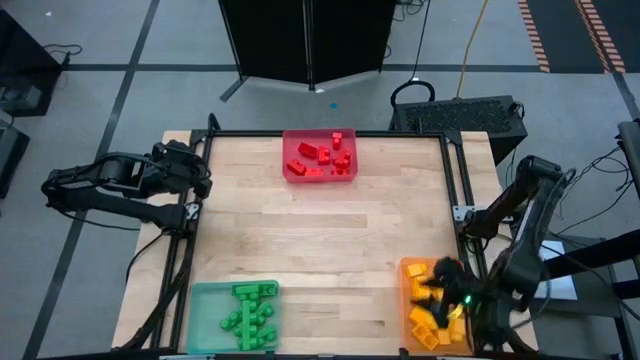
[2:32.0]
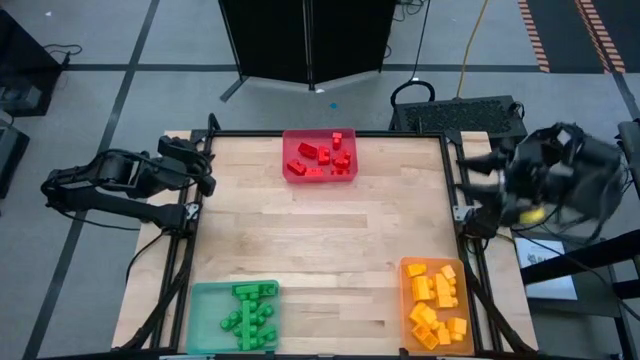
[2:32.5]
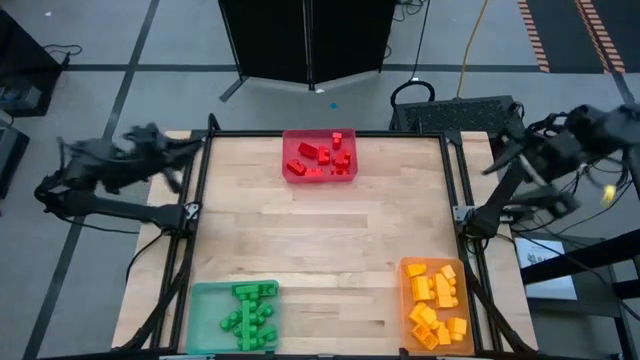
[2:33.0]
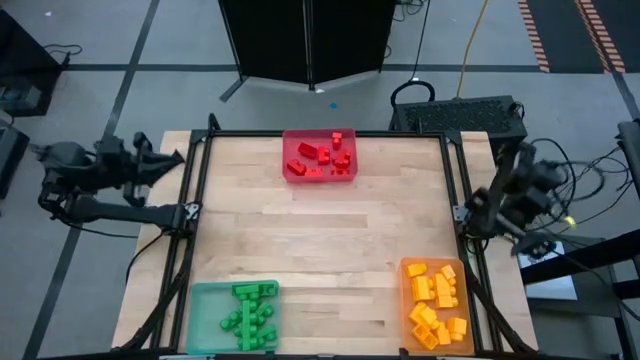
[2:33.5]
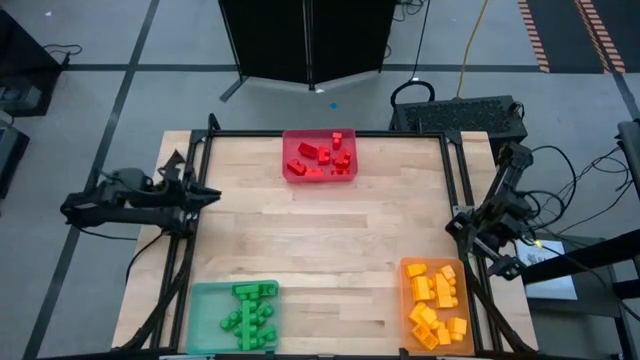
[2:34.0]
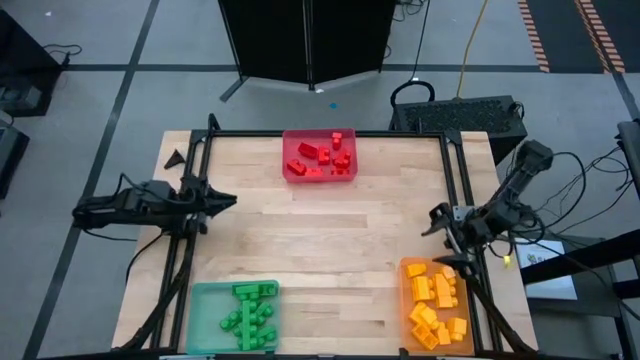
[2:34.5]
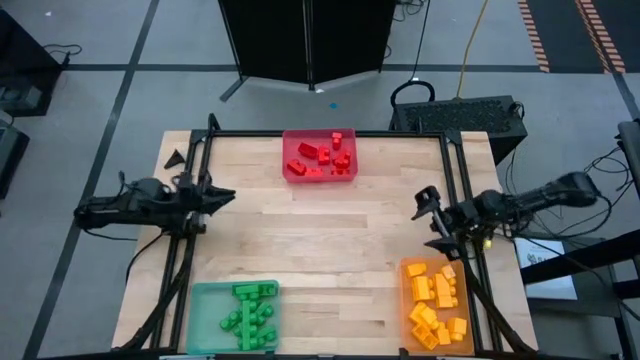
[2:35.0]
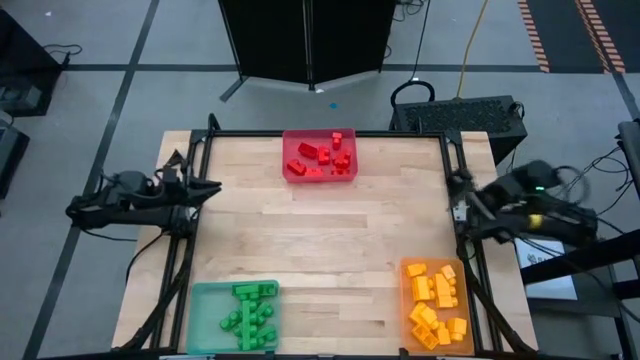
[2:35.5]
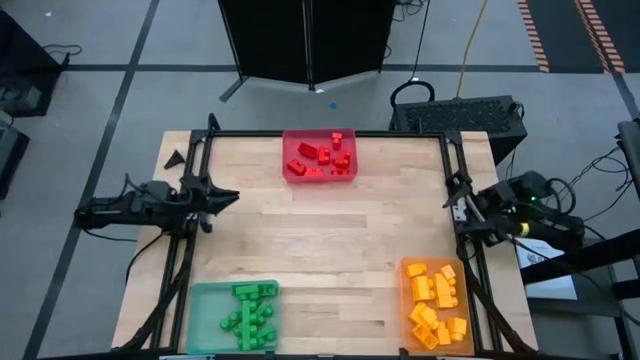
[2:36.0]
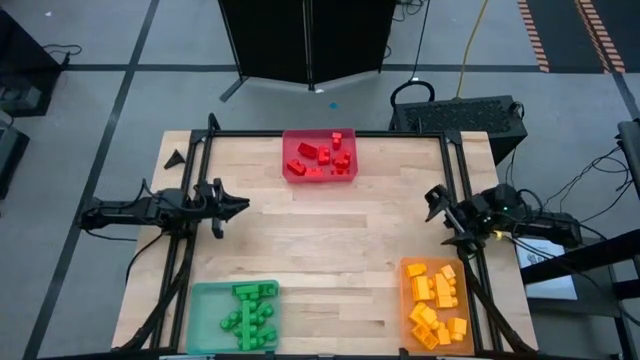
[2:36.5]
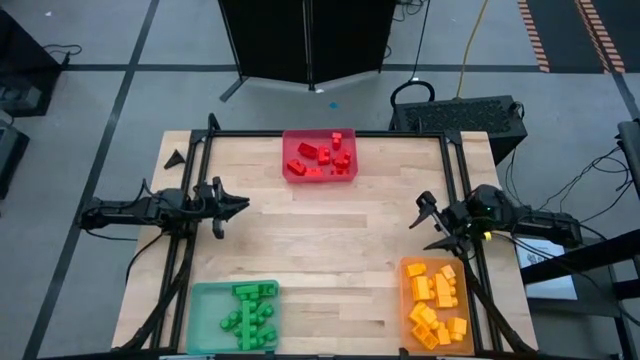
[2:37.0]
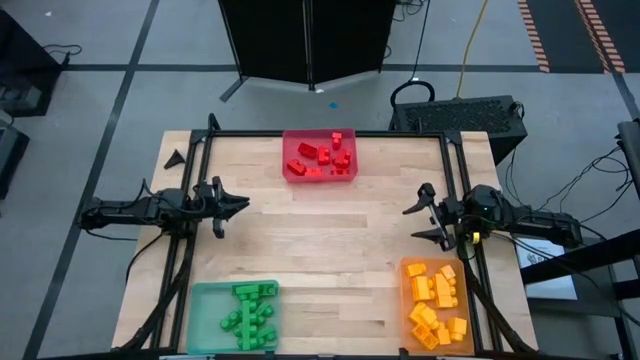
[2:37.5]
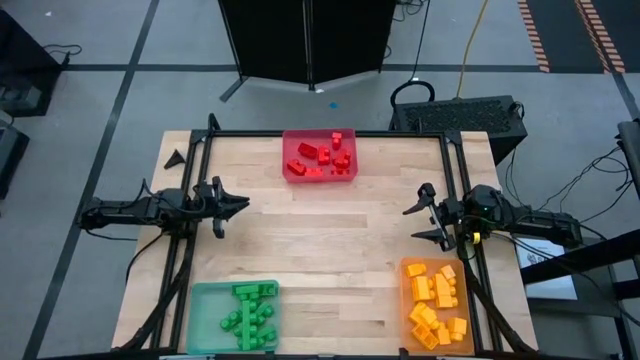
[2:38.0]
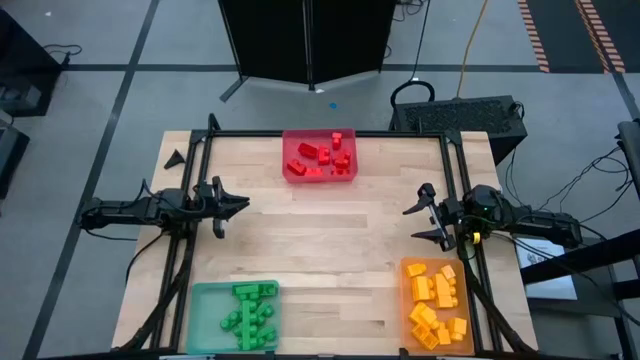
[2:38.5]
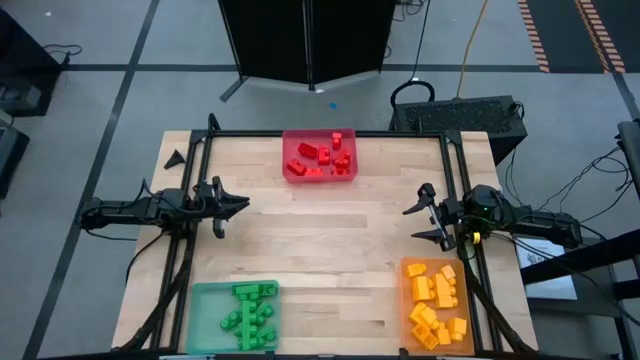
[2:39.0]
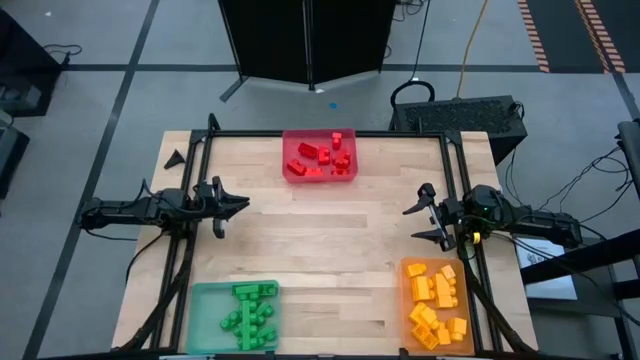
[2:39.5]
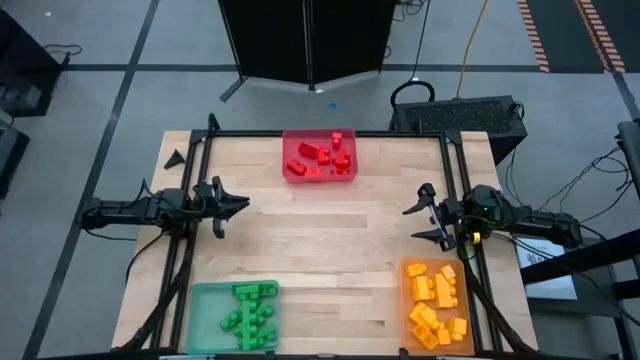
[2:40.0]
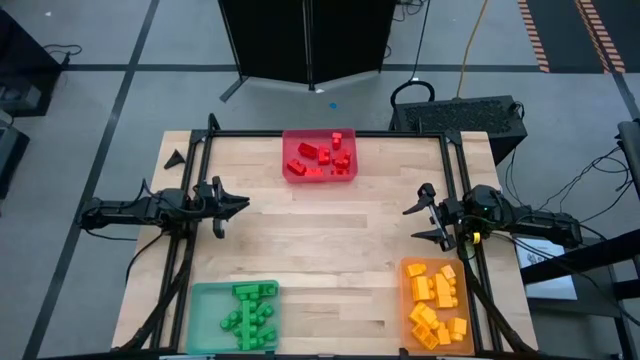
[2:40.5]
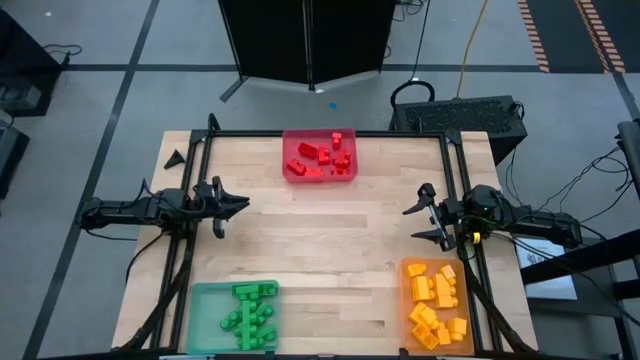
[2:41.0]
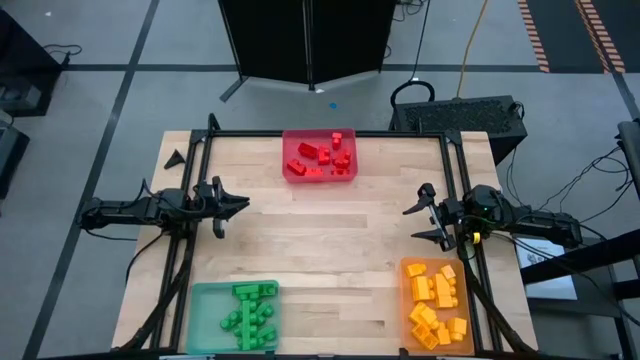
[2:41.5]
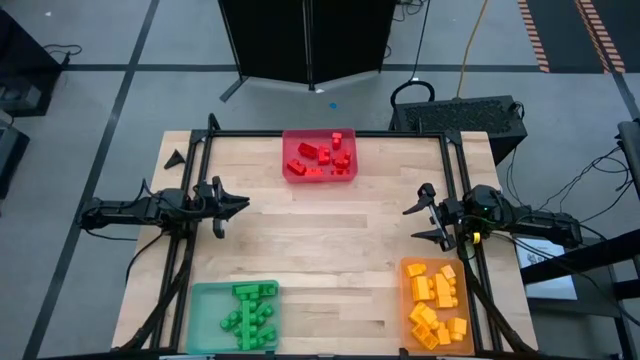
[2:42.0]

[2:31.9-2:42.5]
Task: Sort blocks
Return to Home Position

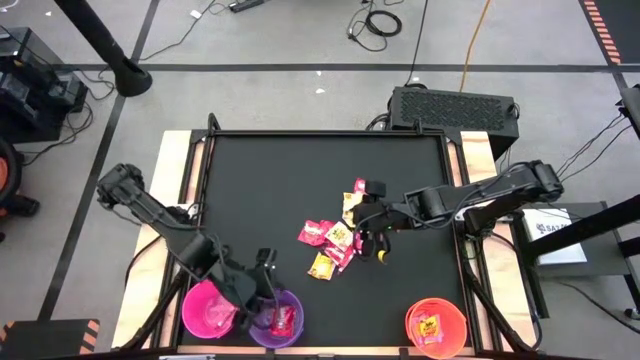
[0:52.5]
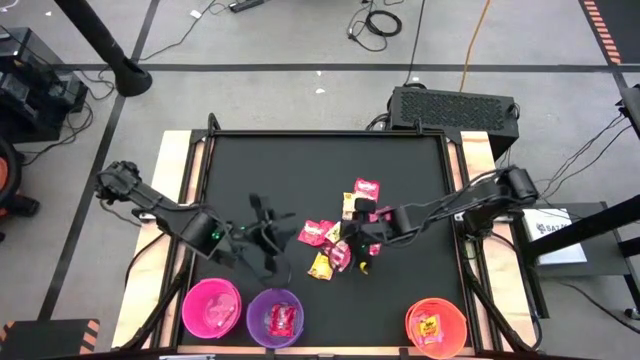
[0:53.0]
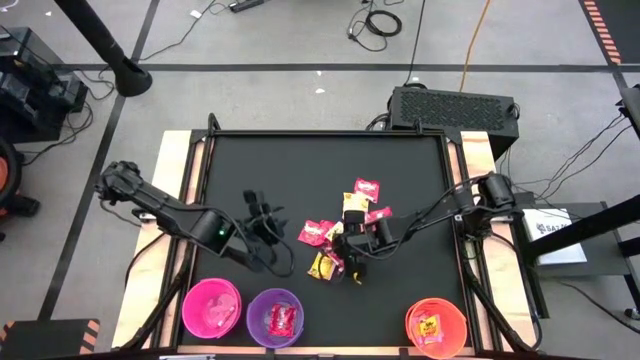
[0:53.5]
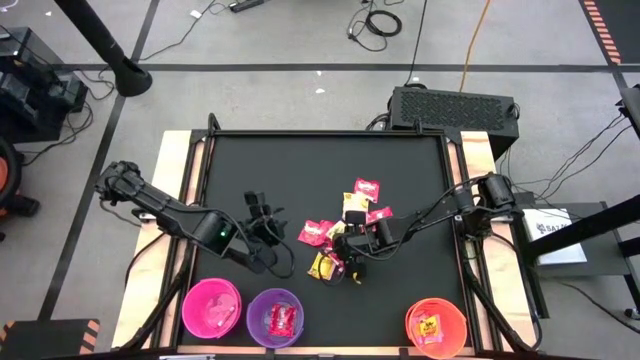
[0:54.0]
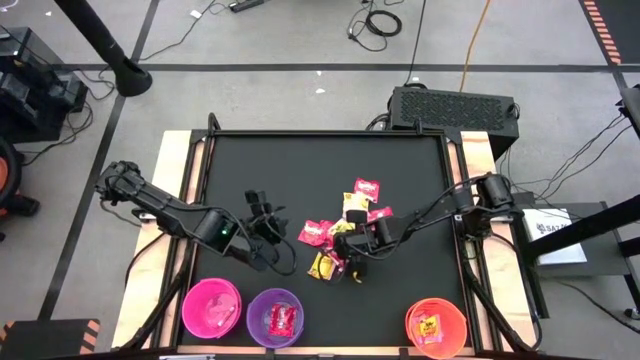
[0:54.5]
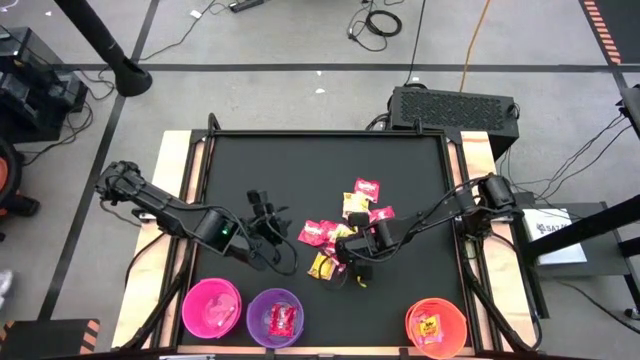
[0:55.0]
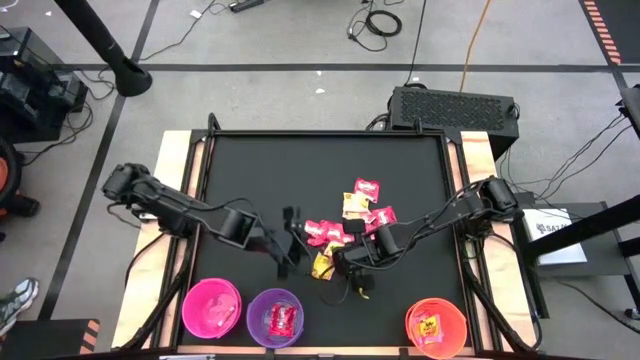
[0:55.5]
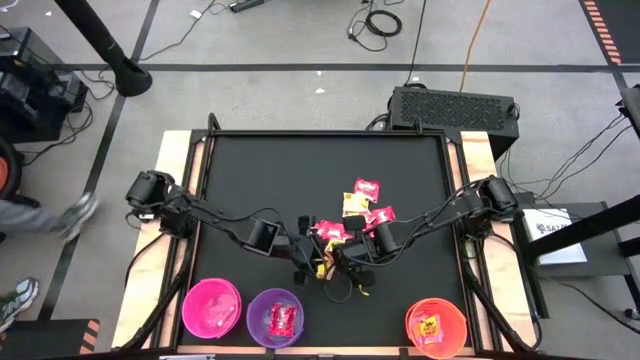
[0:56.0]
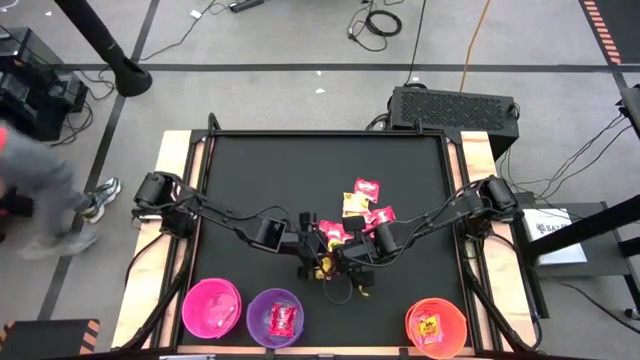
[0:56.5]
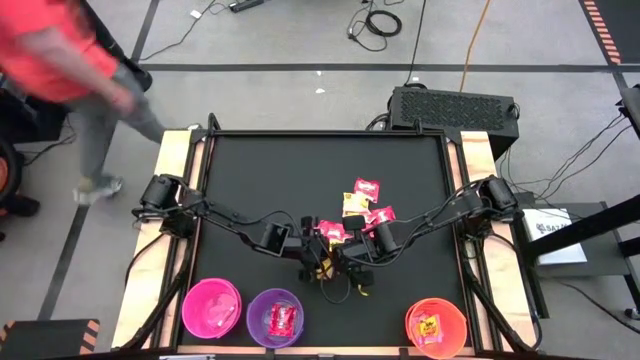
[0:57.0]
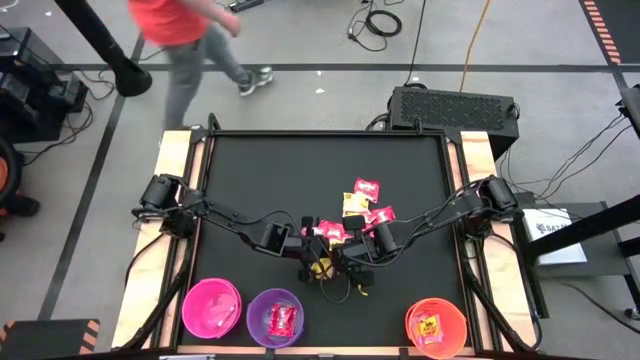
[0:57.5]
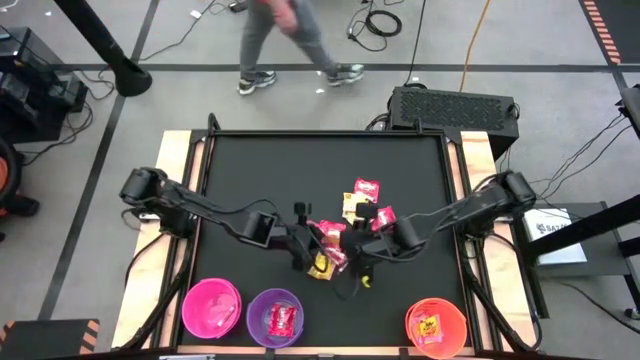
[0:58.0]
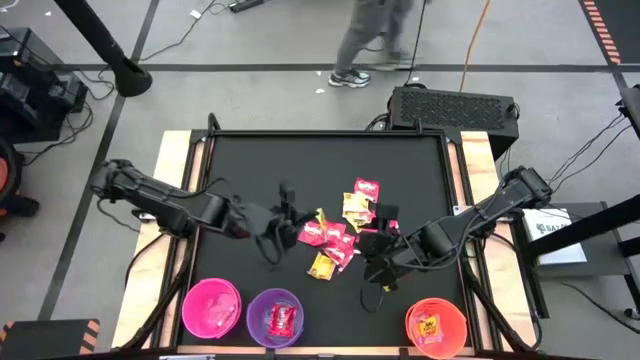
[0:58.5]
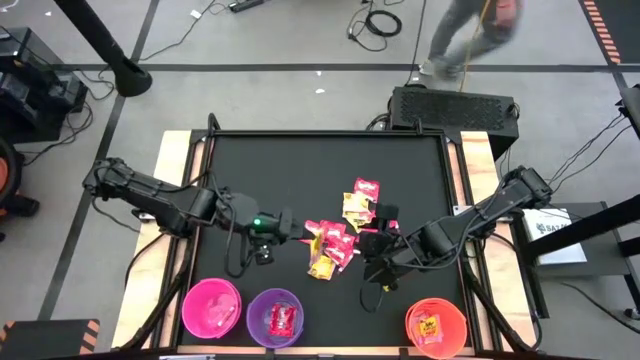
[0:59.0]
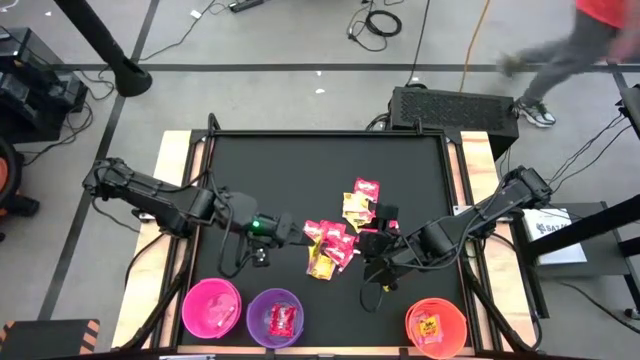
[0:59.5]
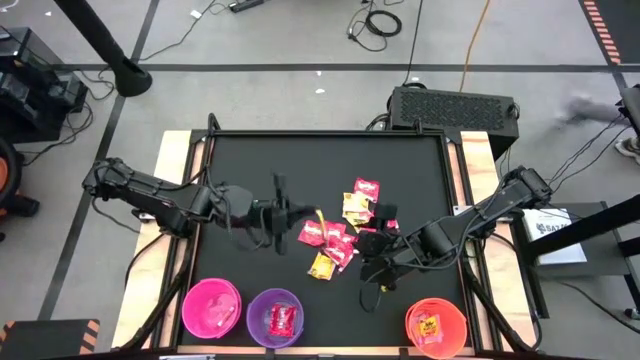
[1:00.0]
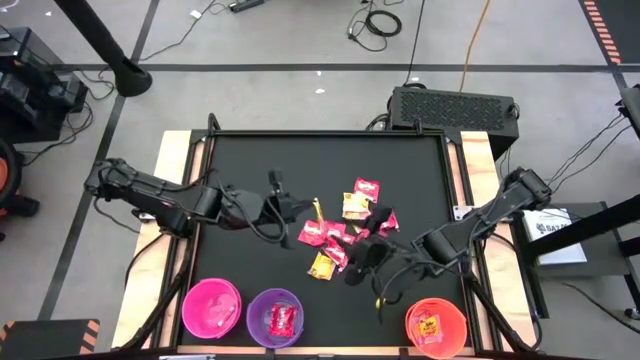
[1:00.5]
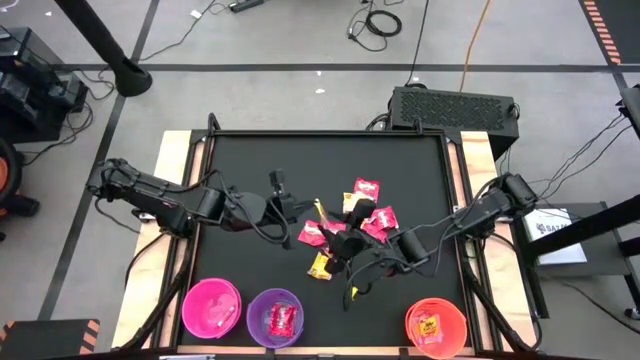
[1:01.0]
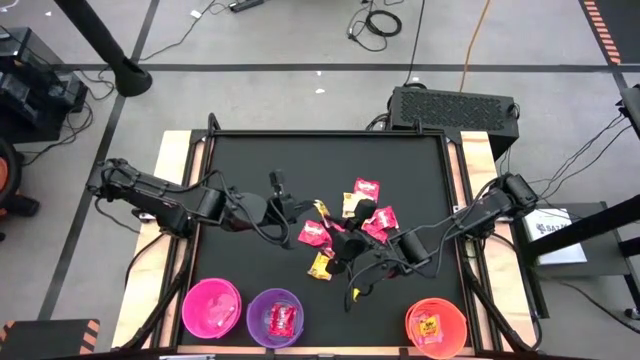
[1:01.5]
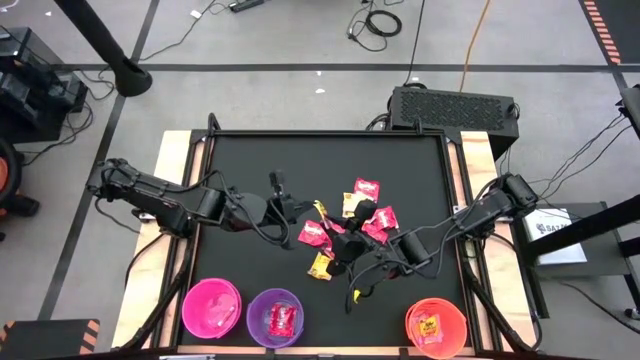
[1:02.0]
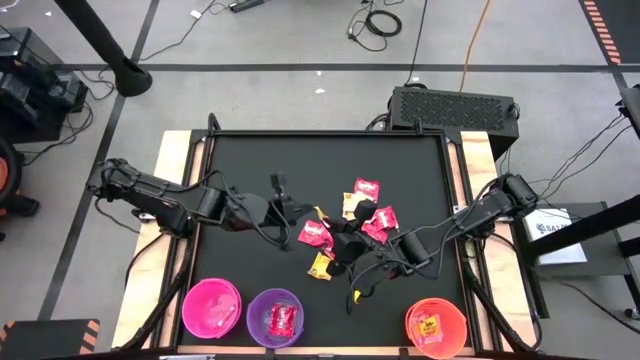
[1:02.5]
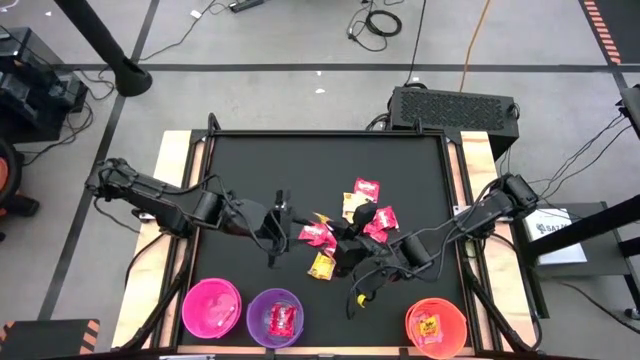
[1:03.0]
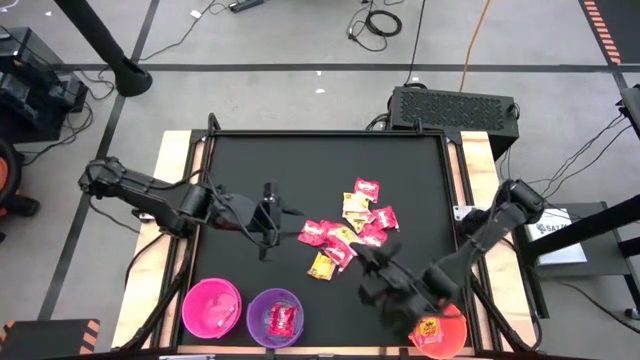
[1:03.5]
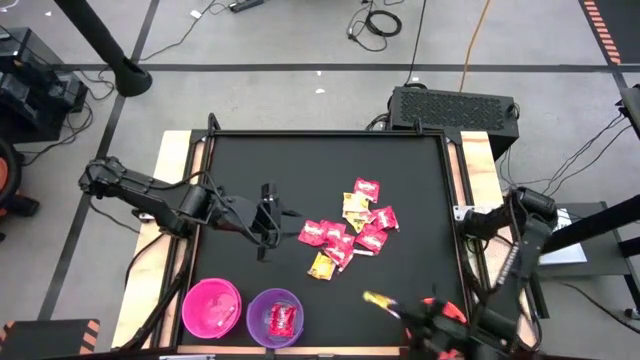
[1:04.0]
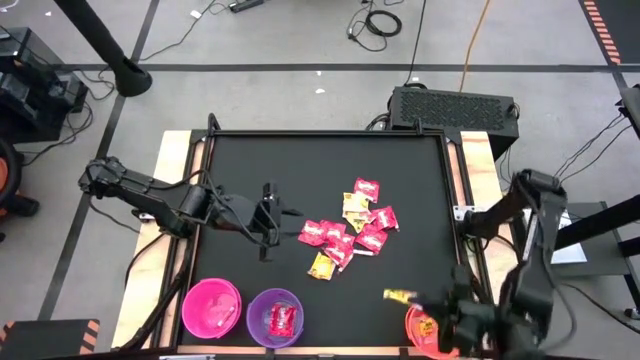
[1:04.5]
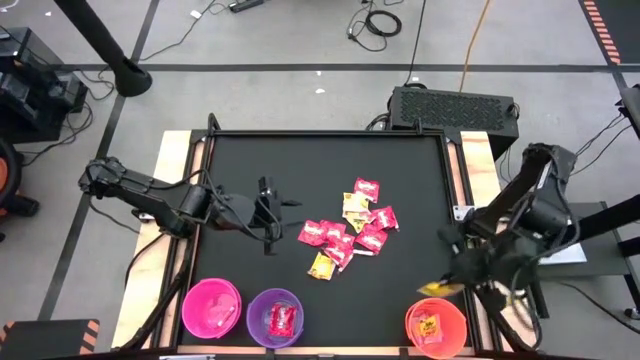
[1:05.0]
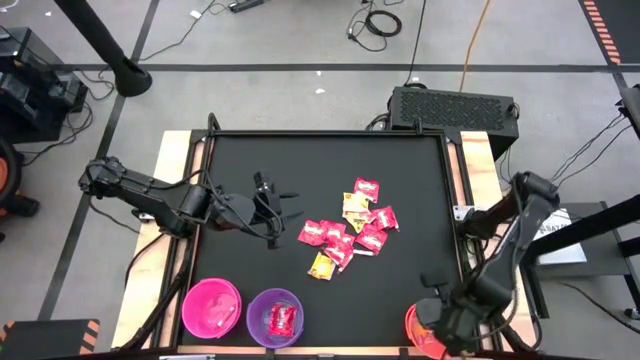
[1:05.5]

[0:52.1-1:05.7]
Task: Sort candy by brand, put in halloween buckets
Put the yellow candy into the orange bucket
